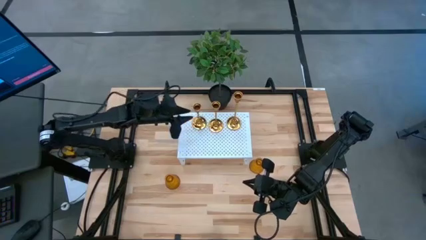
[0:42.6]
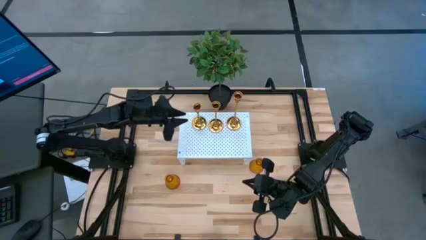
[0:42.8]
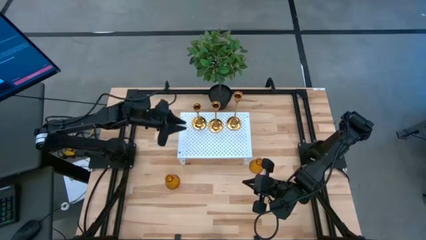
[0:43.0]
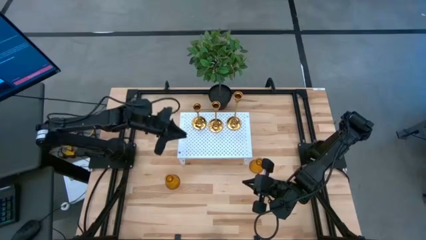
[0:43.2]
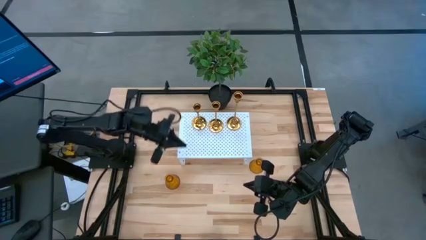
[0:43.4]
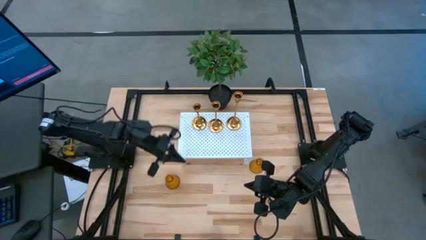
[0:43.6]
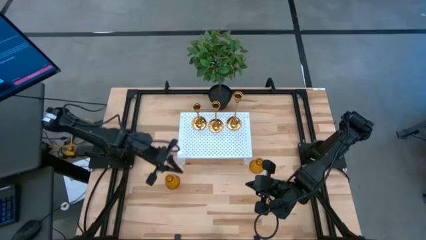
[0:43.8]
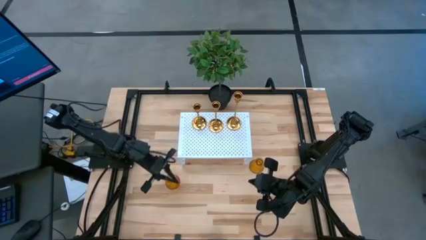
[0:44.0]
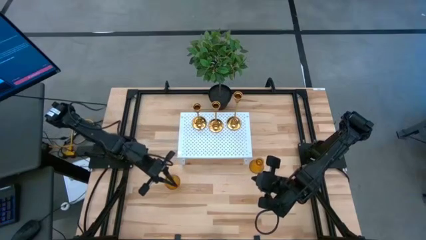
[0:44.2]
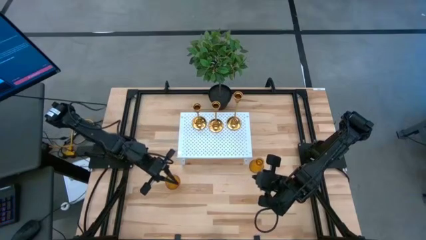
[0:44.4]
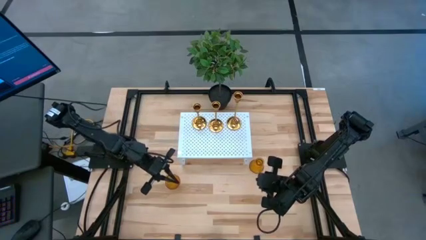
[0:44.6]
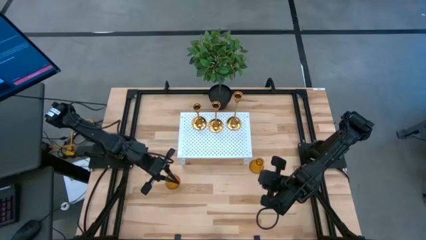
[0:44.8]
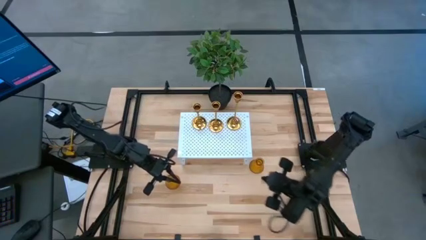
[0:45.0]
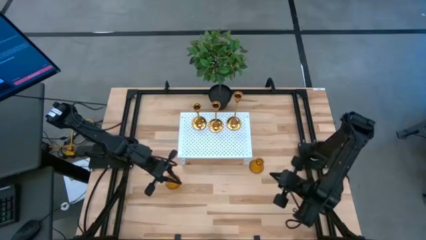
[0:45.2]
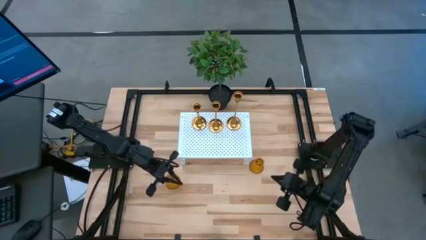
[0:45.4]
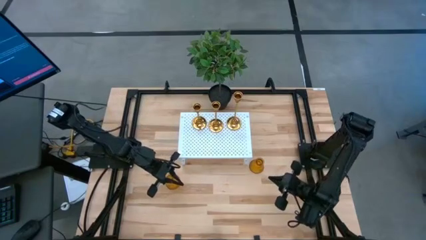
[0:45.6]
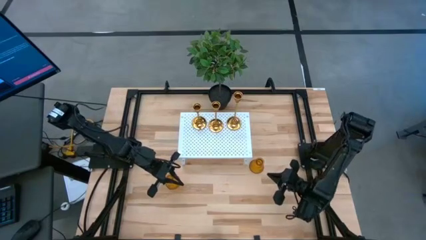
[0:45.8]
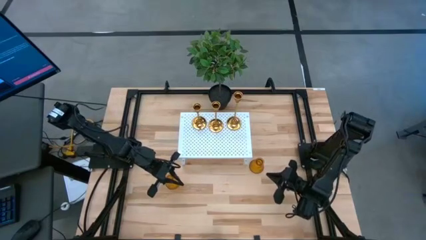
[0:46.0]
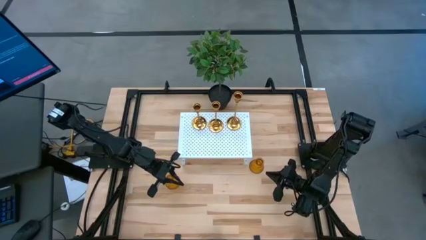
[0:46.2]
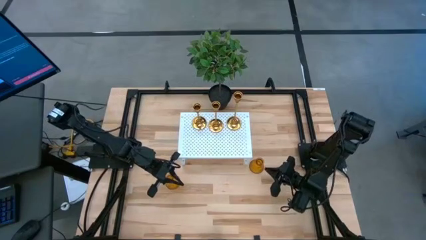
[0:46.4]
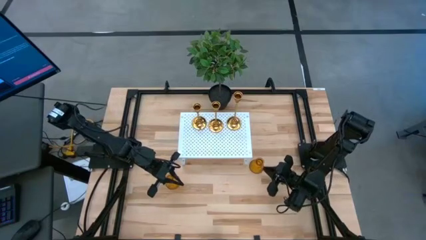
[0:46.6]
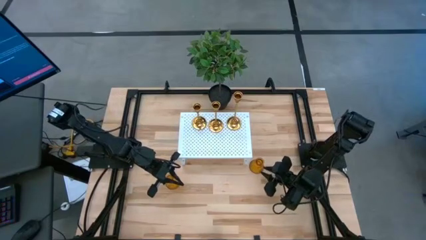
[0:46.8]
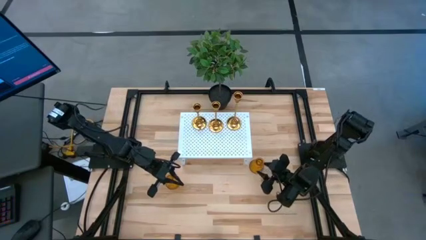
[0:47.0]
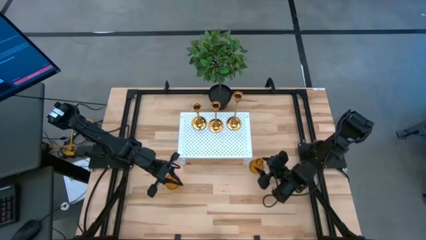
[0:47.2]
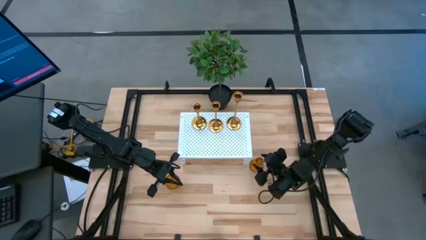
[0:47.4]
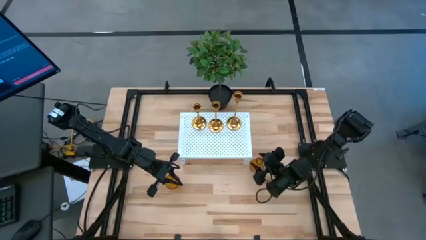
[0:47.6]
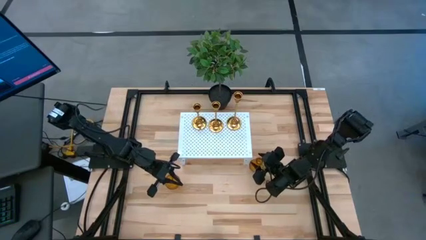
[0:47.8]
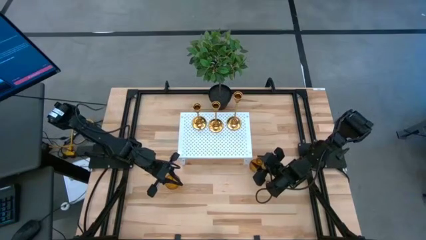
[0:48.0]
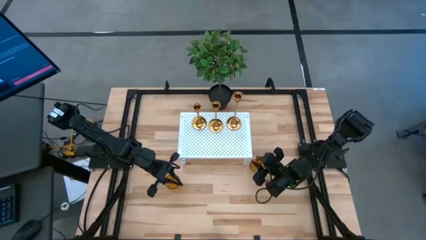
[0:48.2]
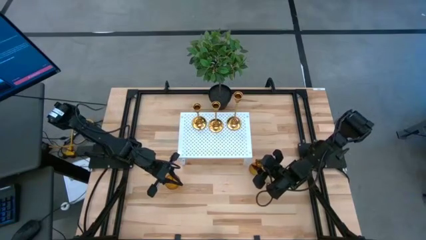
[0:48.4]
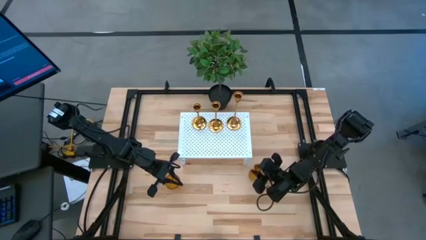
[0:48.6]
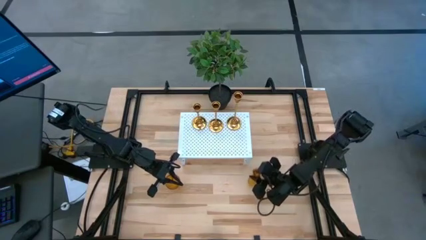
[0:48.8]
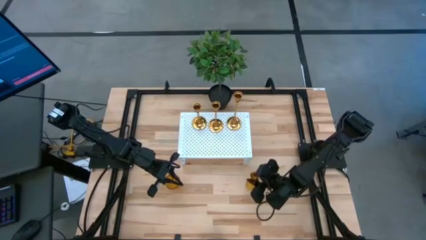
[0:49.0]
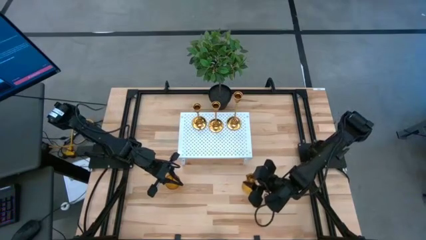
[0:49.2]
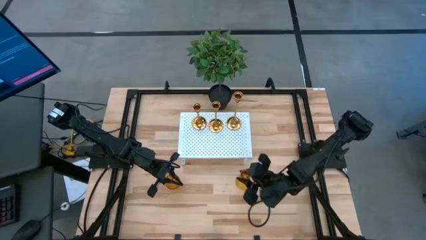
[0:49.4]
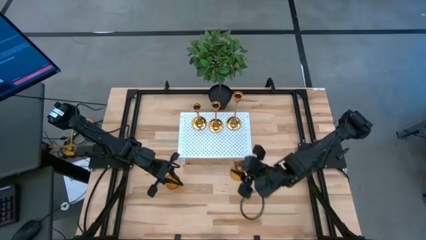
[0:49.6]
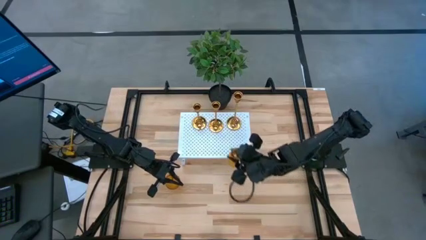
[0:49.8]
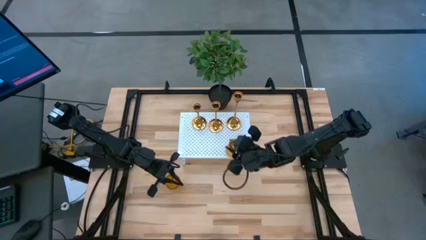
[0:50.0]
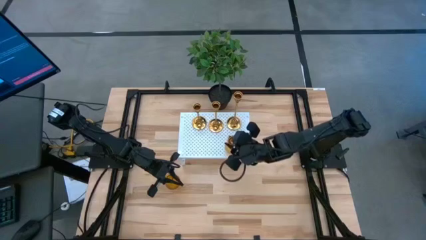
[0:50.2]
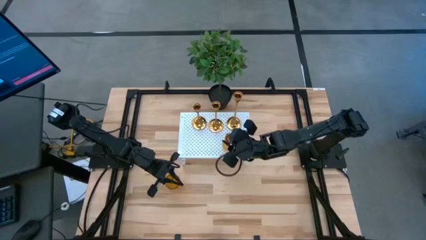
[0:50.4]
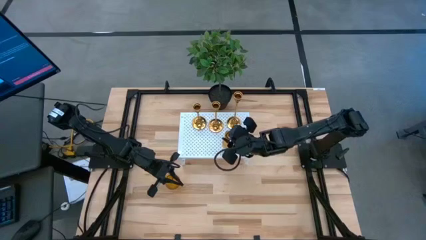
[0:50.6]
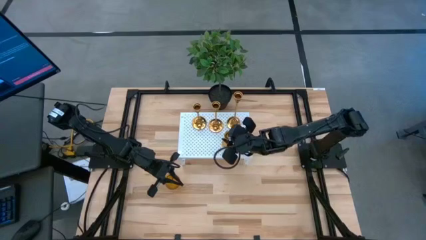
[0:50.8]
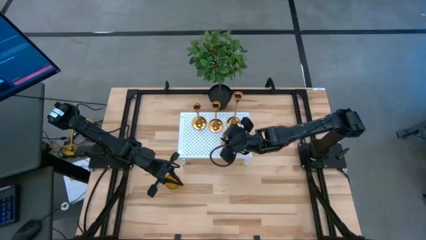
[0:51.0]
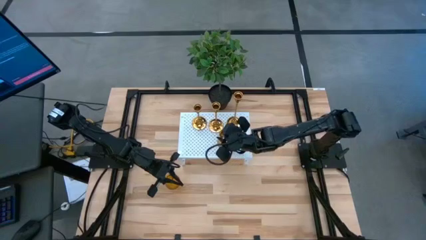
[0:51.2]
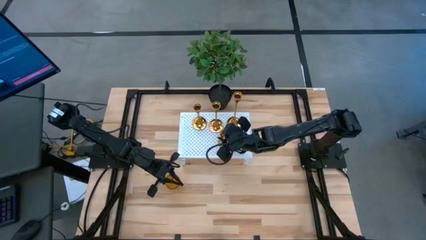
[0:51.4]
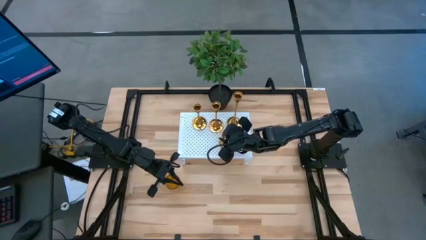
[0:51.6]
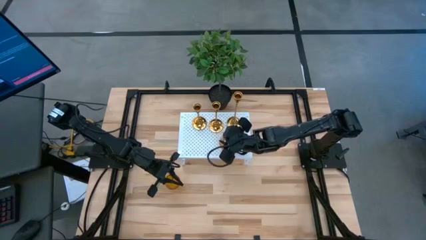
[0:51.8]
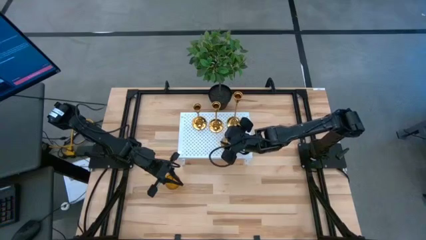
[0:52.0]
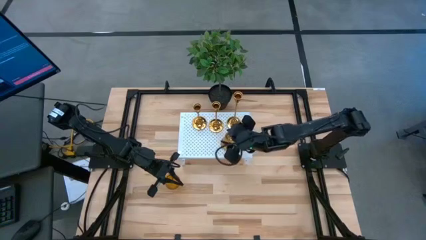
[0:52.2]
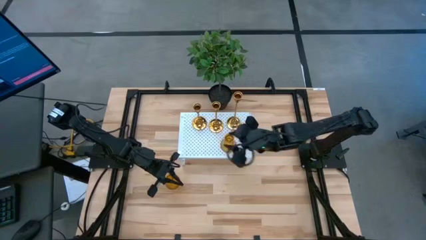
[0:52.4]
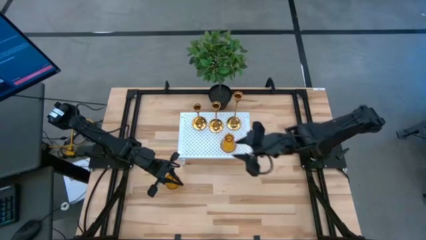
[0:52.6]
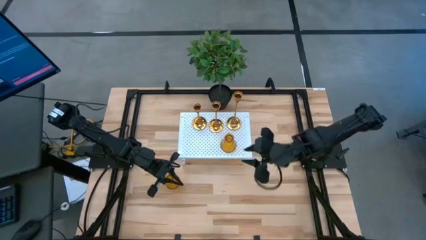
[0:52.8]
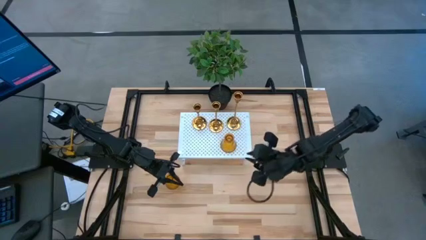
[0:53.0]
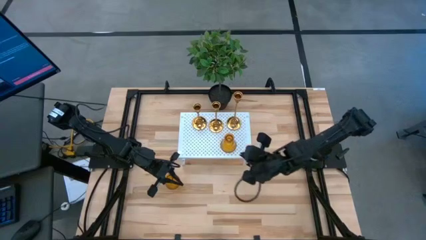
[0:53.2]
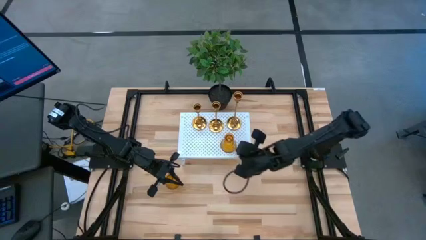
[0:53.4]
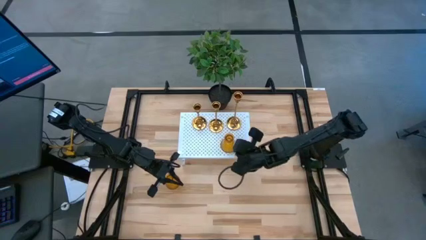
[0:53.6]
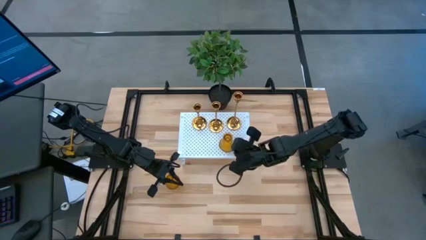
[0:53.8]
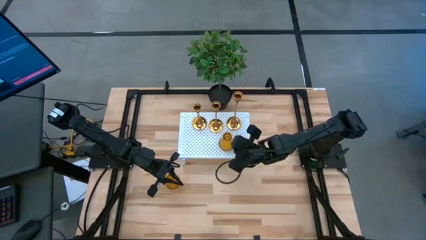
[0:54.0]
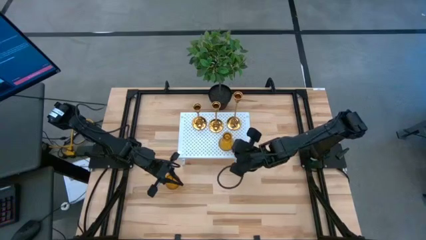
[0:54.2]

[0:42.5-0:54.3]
Task: Pick & Place candle stick holders
Put the right orange glass candle holder on the shelf

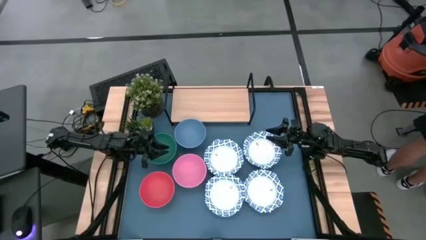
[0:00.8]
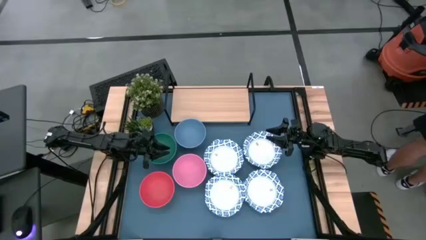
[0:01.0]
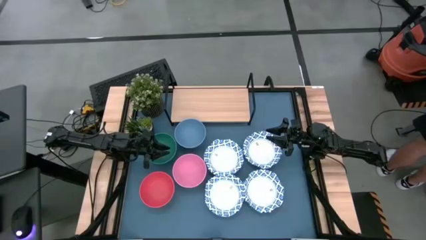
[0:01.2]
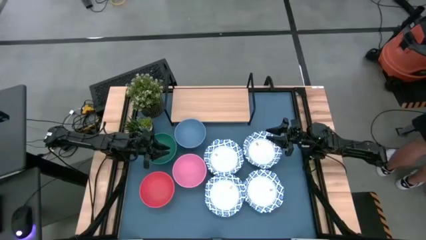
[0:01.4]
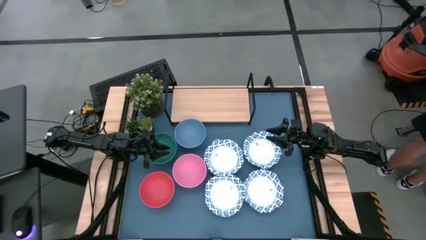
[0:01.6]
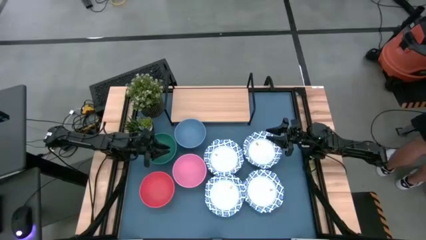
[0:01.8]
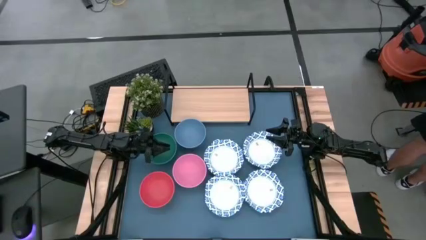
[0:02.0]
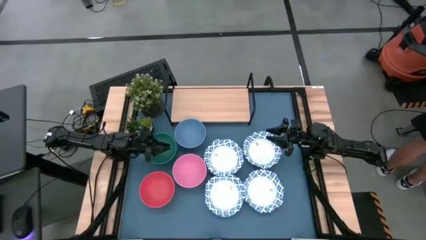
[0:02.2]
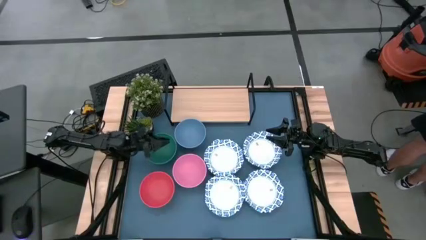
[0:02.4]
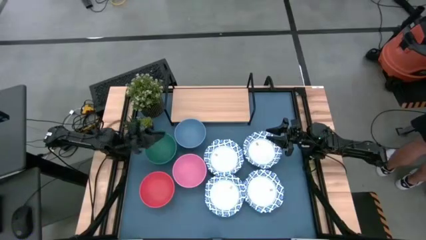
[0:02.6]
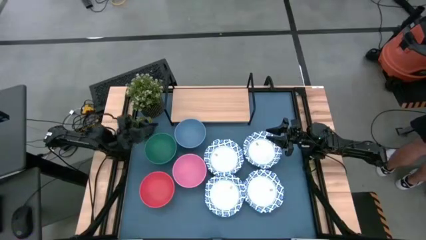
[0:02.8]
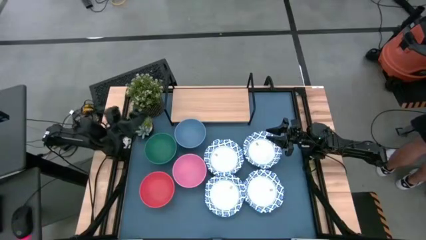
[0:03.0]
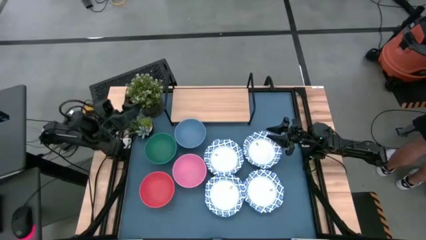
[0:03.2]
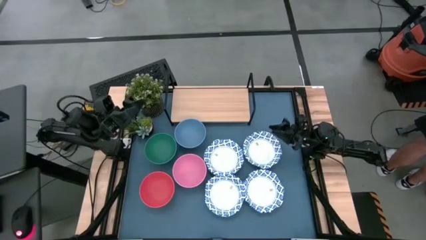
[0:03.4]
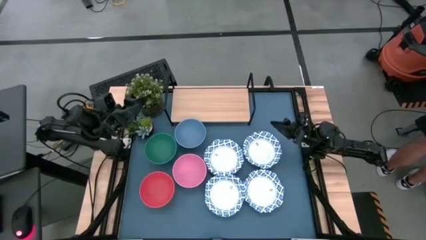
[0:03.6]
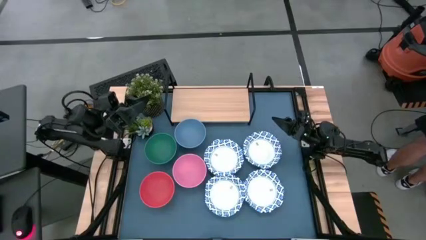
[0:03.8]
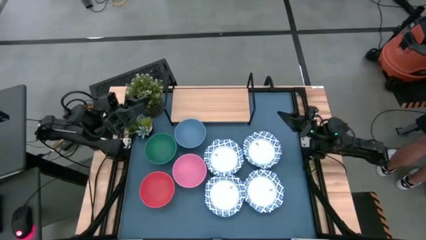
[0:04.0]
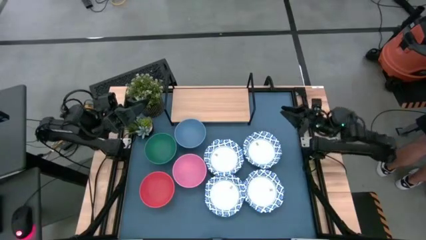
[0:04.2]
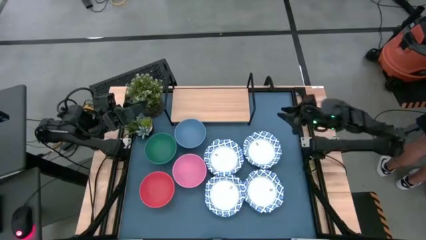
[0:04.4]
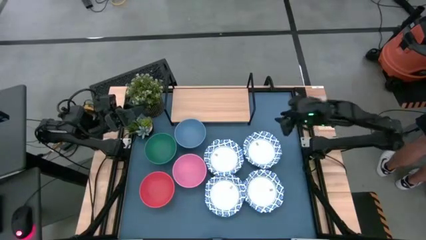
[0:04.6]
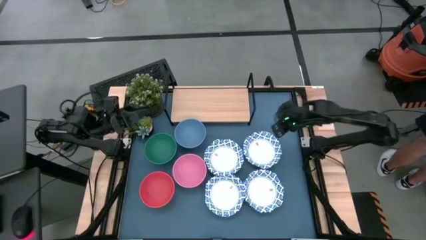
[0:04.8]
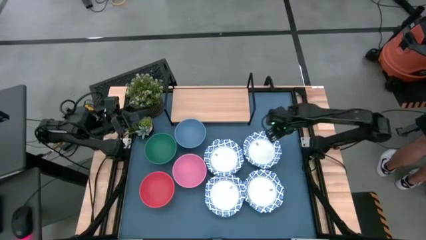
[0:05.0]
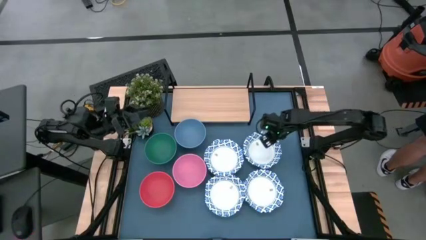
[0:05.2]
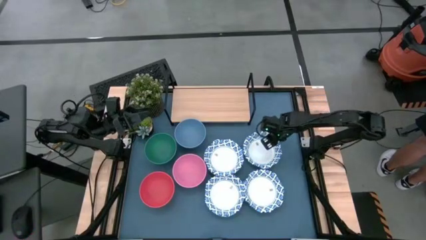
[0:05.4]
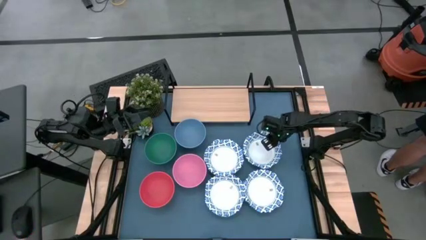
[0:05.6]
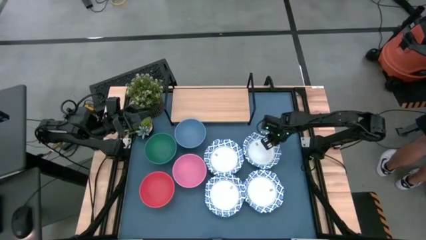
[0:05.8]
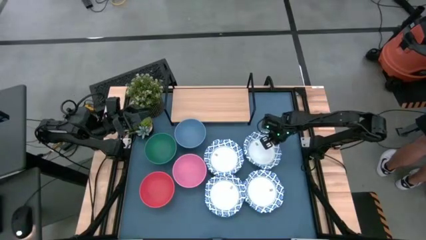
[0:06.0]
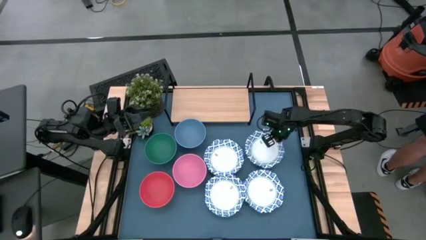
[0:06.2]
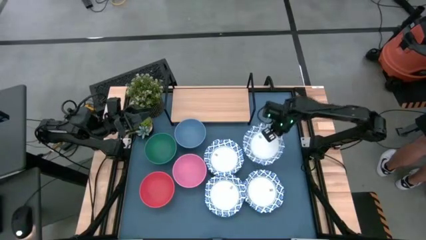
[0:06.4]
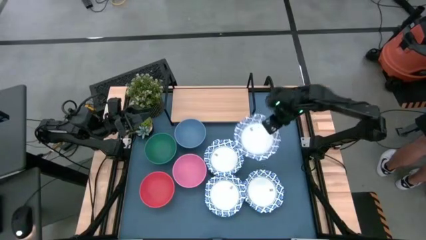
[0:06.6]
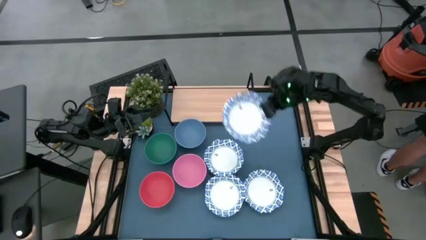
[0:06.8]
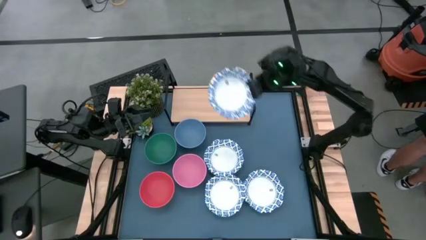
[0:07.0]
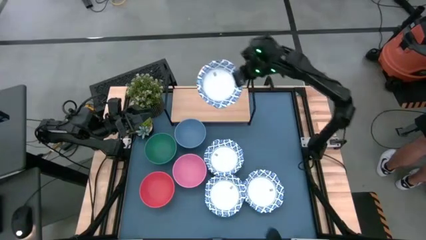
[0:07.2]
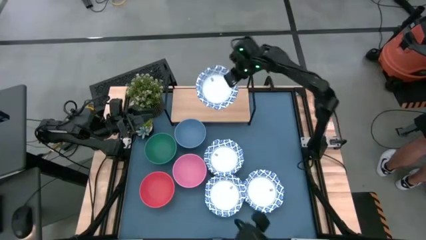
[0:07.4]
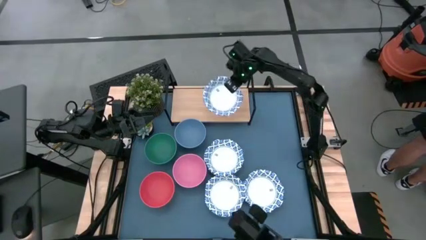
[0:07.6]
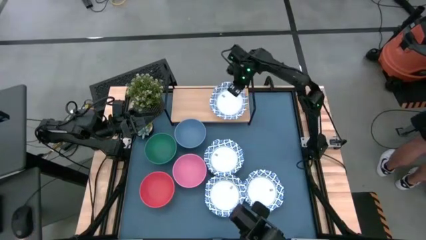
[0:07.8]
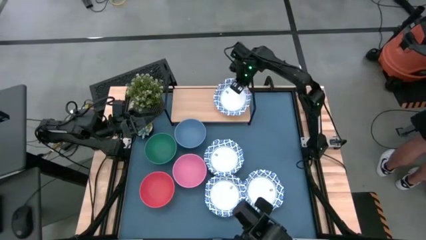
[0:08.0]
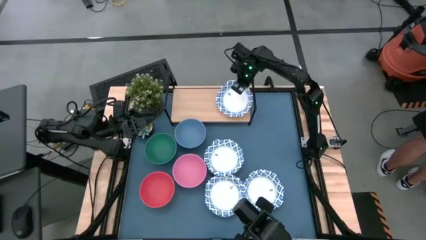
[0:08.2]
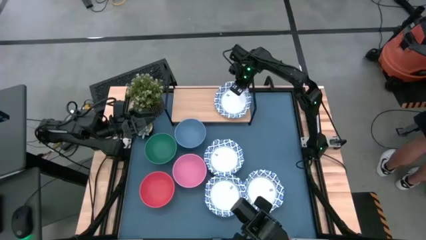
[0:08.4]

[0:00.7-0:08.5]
Task: Place and stack bowls onto a shelf
Put the white bowl on the shelf
